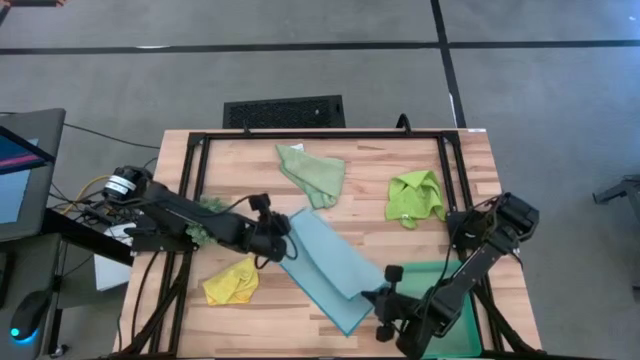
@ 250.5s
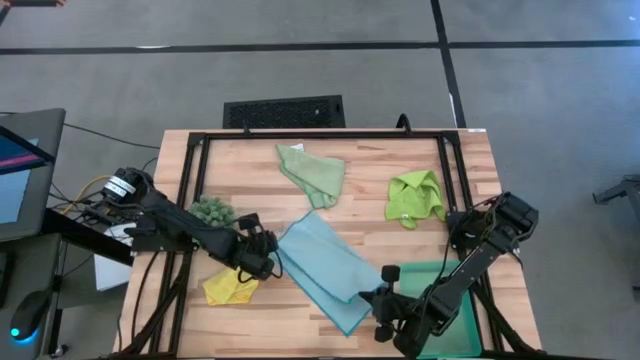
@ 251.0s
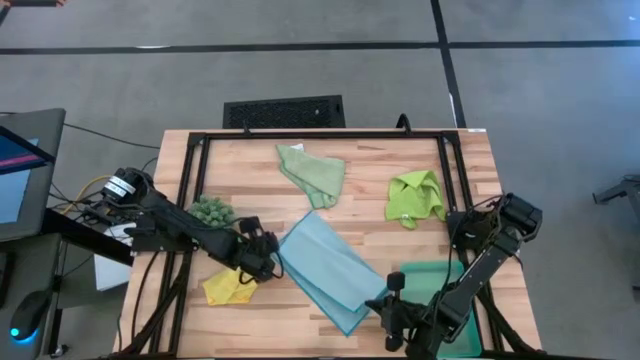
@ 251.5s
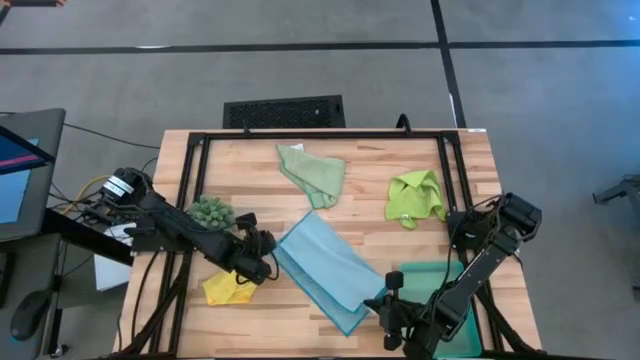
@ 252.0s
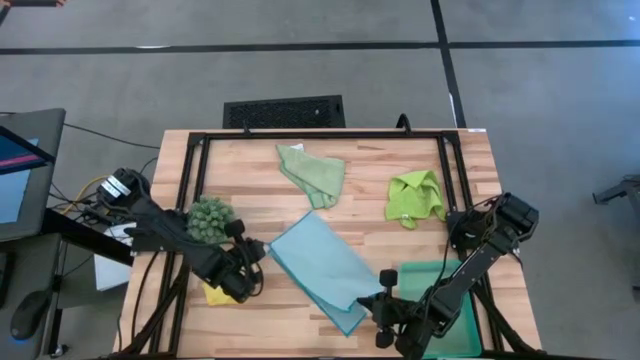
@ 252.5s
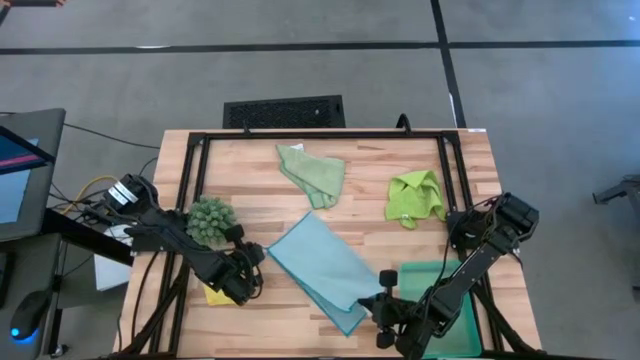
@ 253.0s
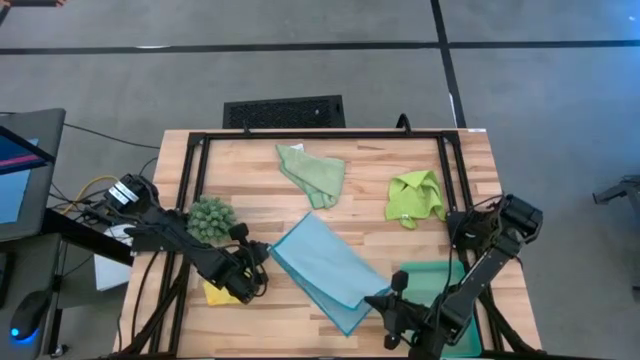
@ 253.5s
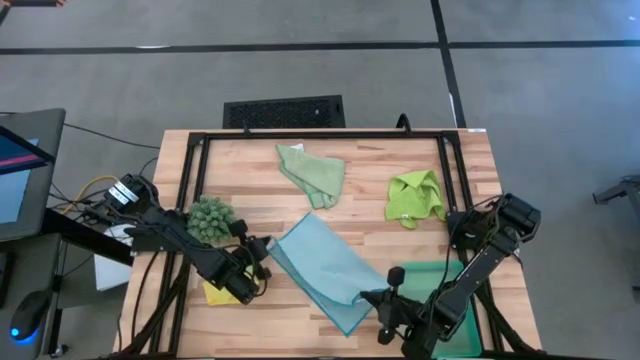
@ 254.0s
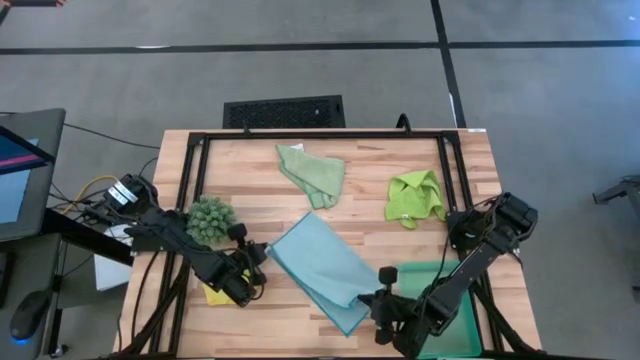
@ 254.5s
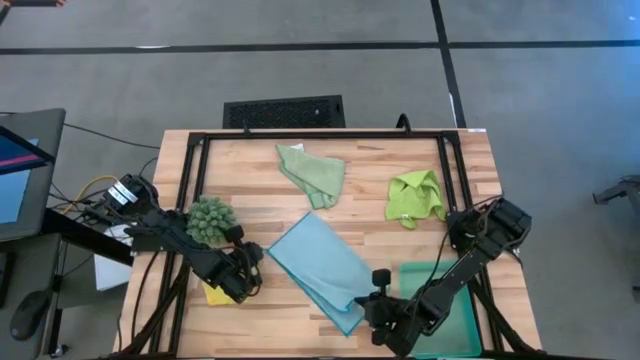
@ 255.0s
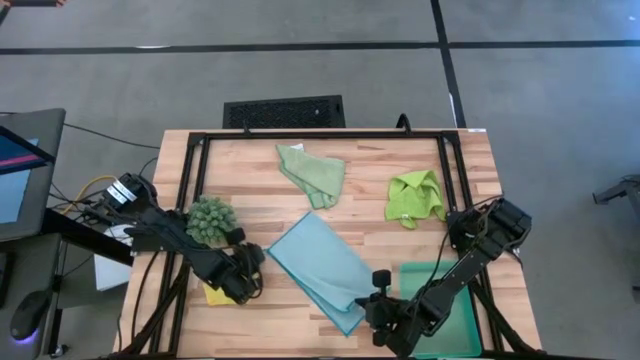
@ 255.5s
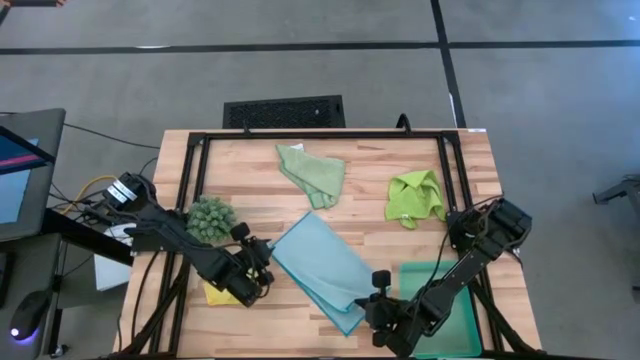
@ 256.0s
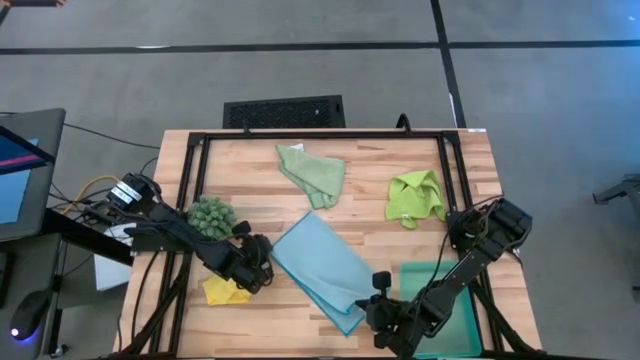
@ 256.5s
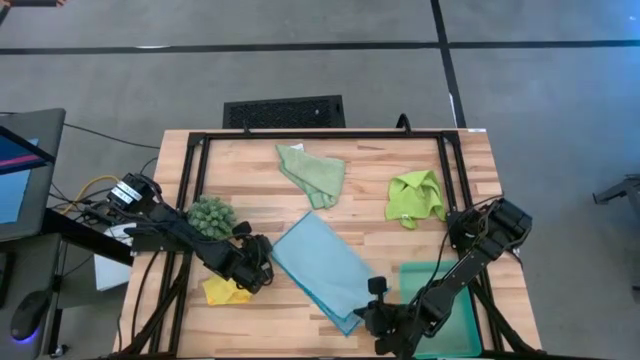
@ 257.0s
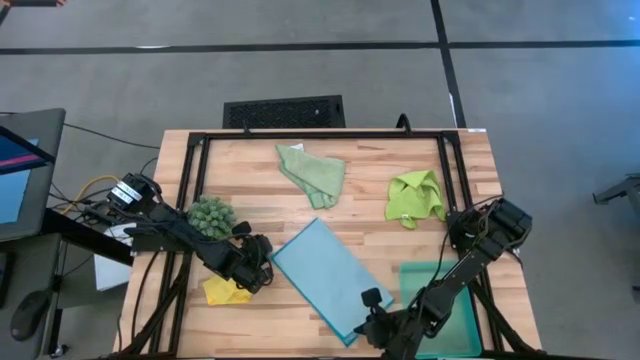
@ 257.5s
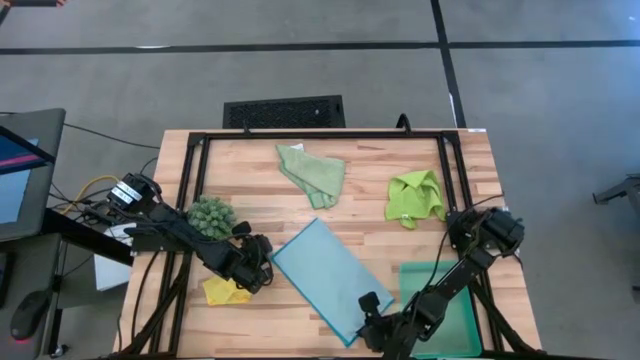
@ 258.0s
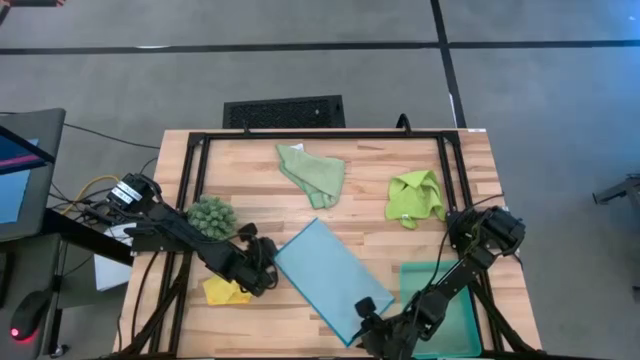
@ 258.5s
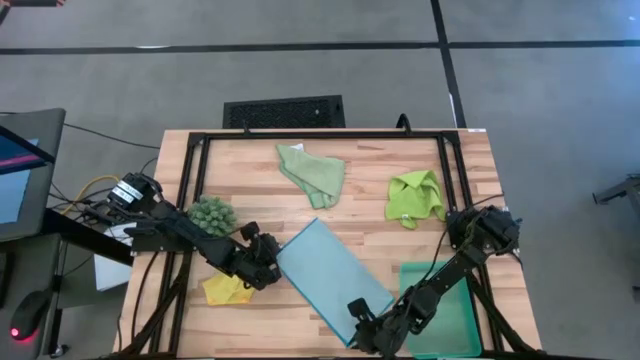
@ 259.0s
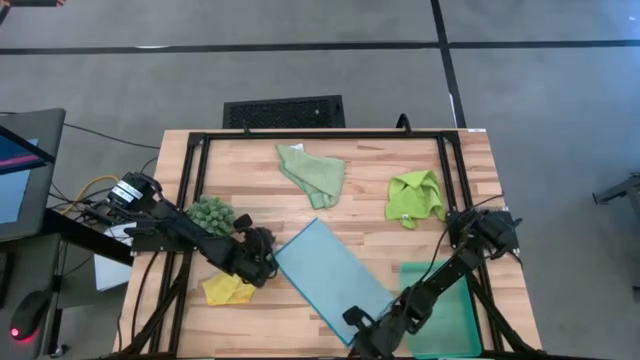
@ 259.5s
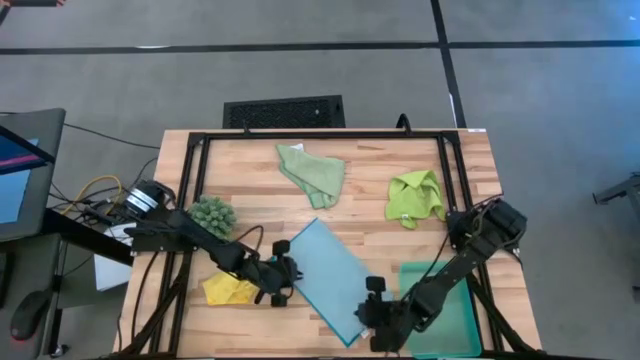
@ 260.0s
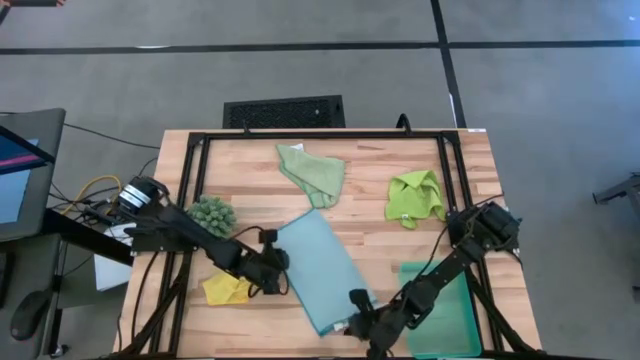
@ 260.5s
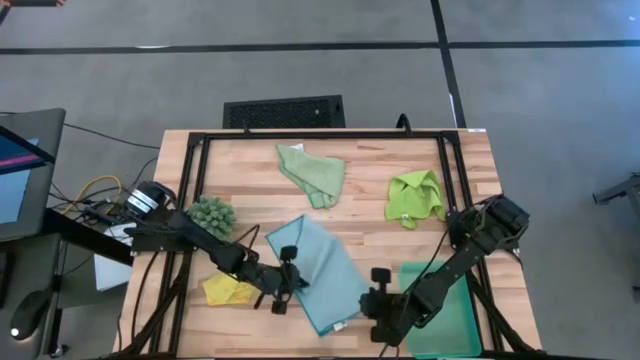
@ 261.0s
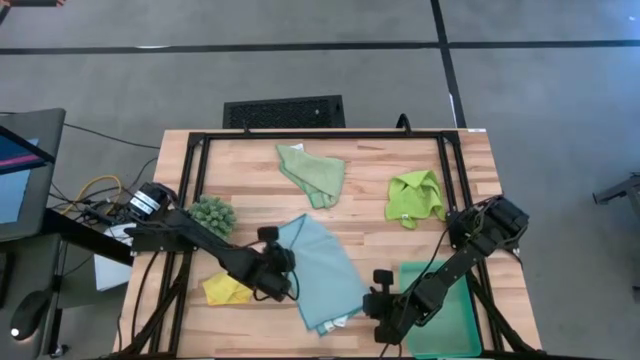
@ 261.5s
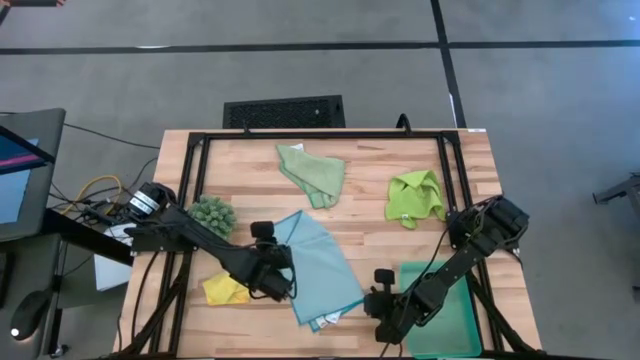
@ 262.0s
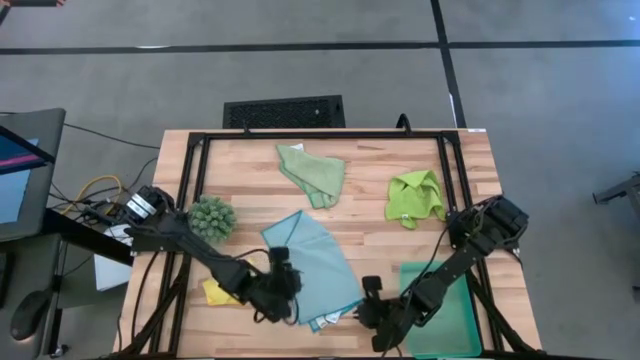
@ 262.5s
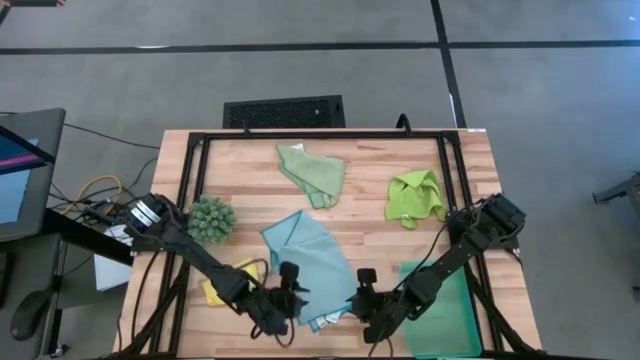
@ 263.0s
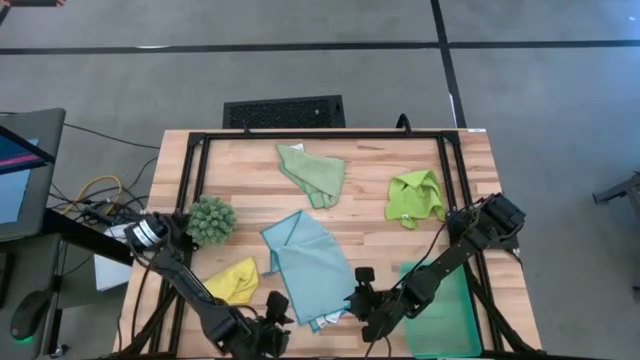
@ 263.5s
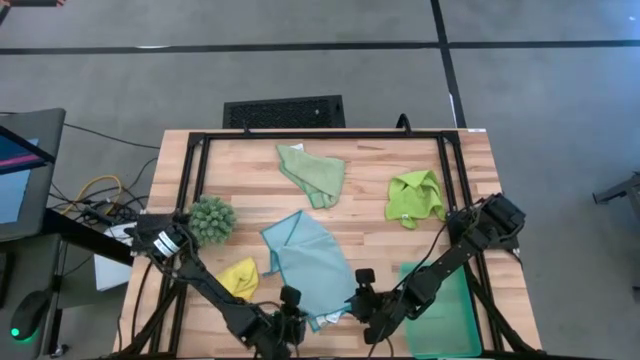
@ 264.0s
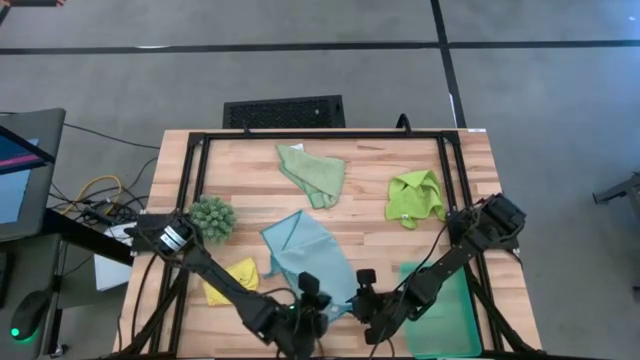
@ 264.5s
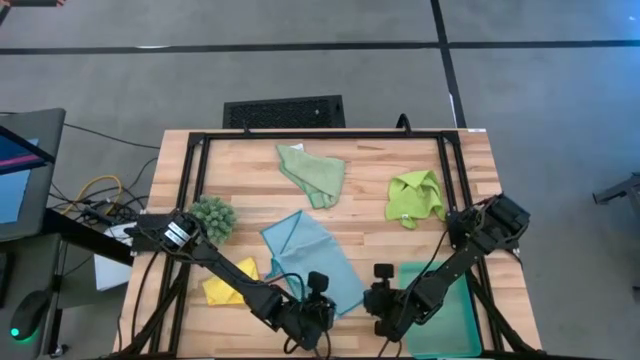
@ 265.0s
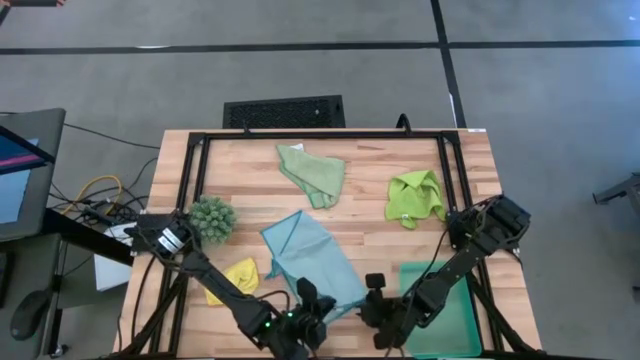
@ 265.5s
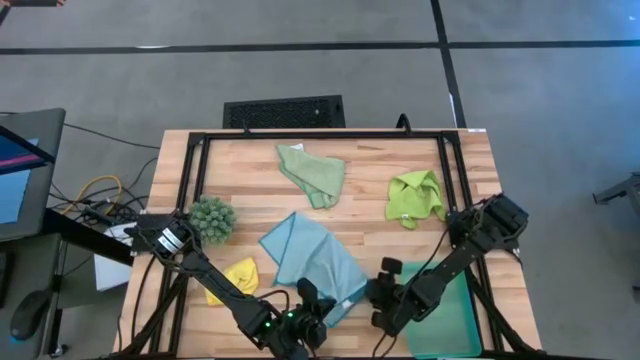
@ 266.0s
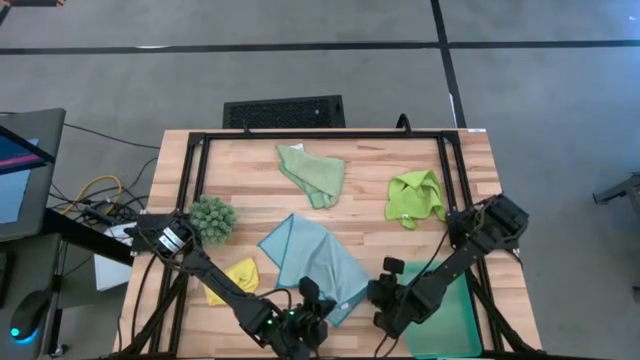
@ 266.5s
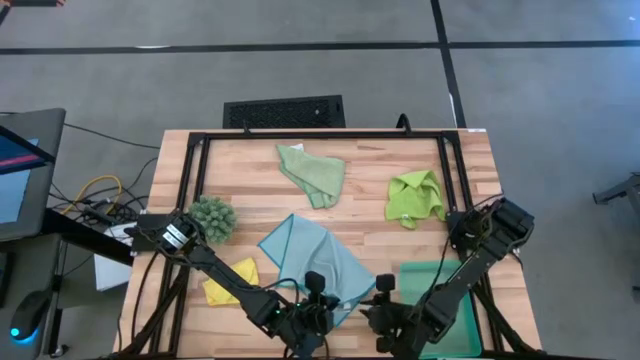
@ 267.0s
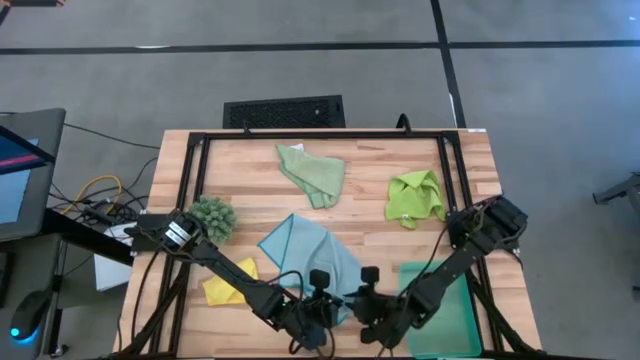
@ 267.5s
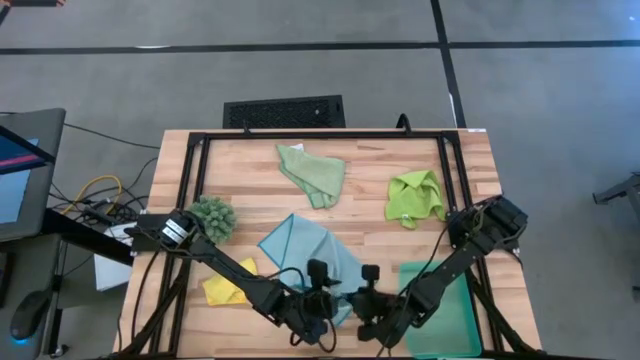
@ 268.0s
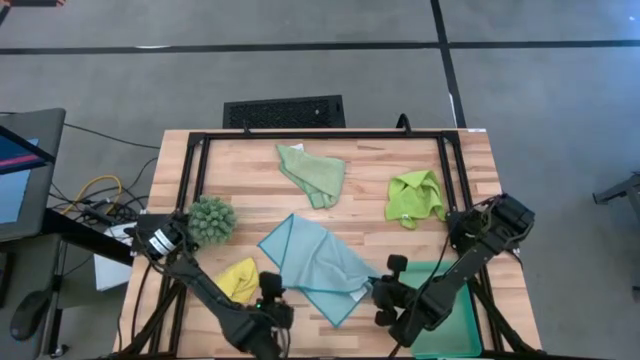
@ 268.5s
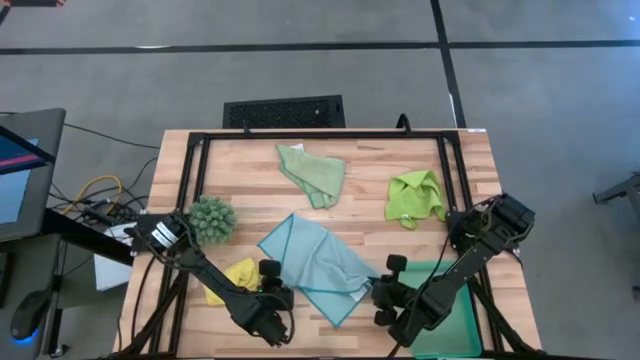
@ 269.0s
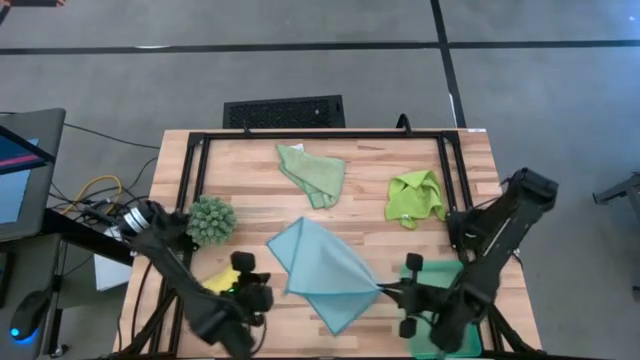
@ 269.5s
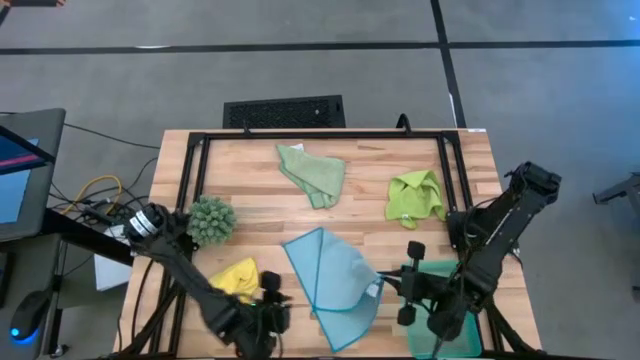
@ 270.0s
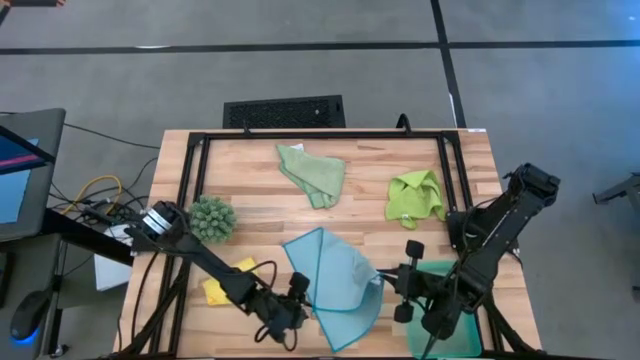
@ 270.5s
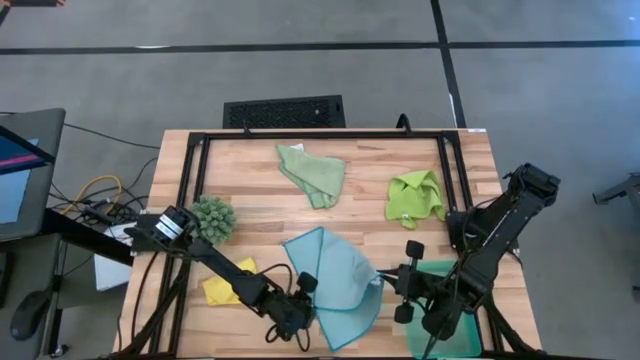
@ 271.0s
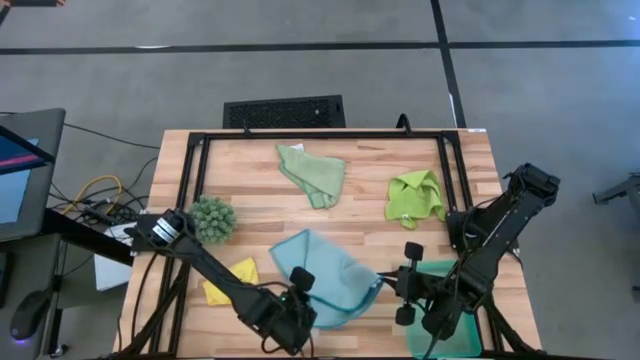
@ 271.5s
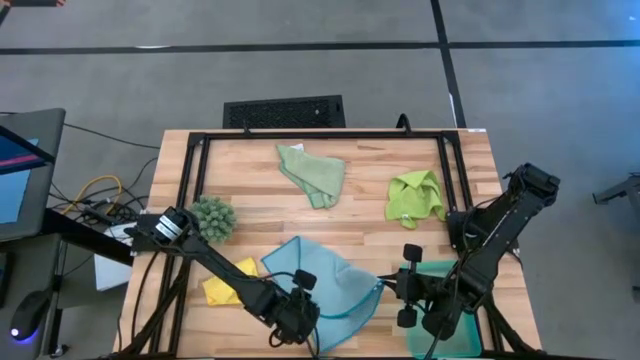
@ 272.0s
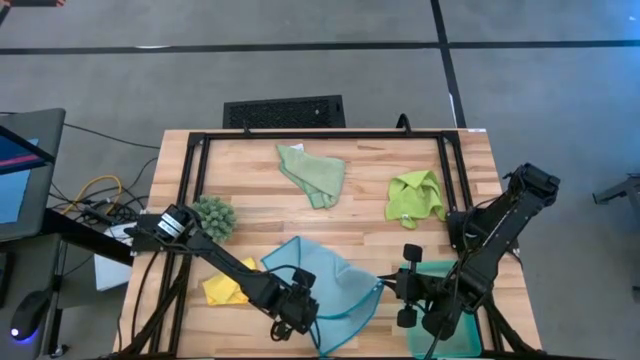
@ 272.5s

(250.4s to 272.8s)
Task: Fold microfiber towels
Fold the blue microfiber cloth
